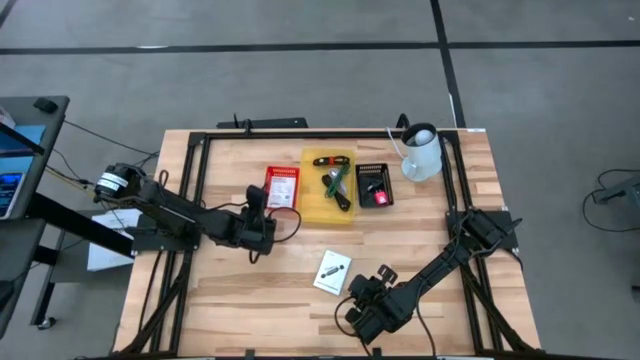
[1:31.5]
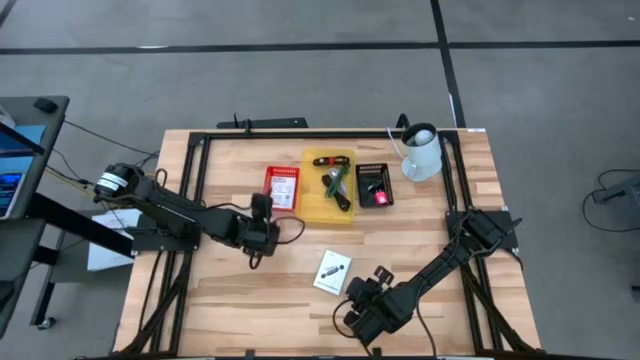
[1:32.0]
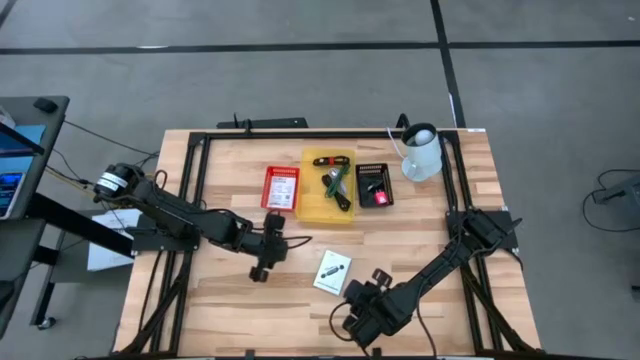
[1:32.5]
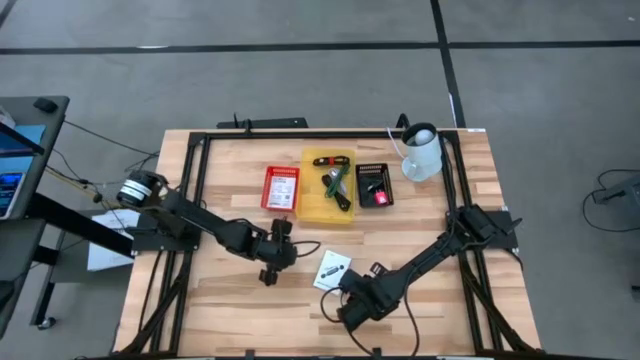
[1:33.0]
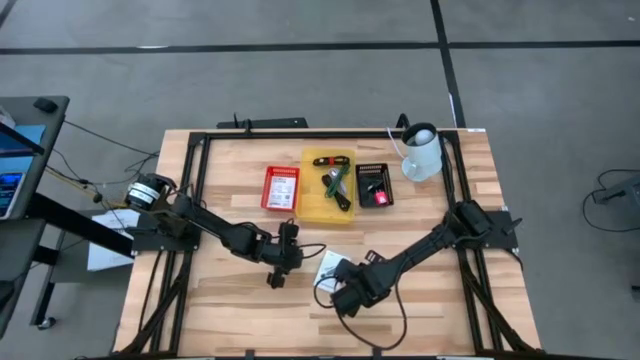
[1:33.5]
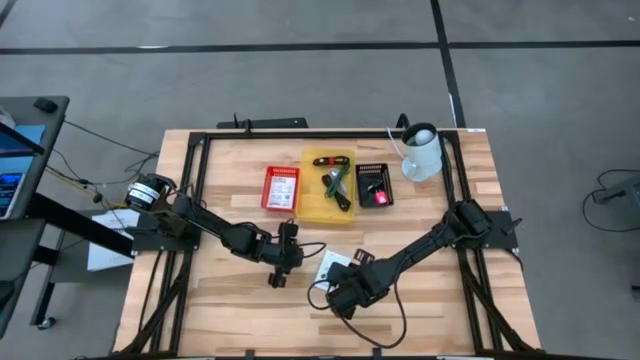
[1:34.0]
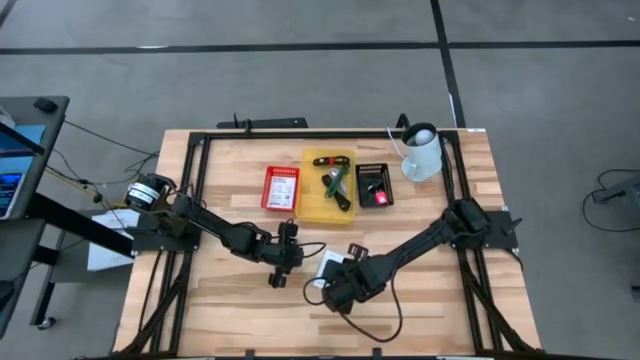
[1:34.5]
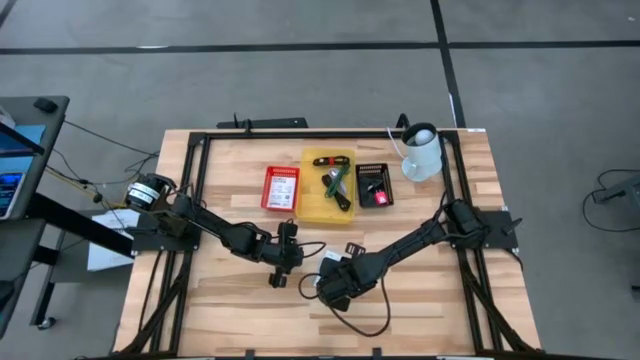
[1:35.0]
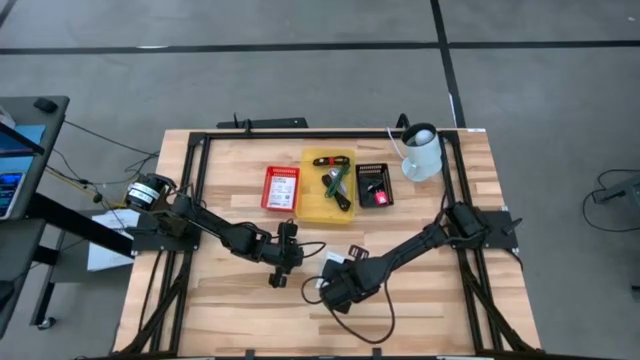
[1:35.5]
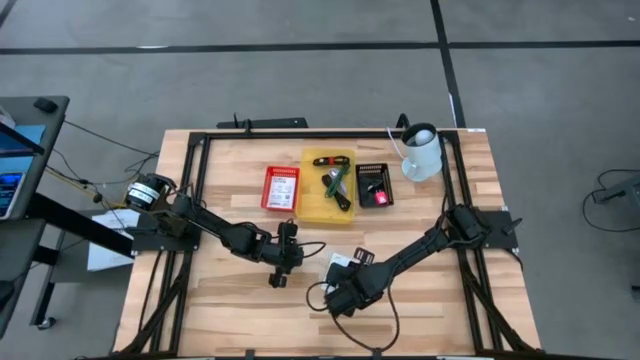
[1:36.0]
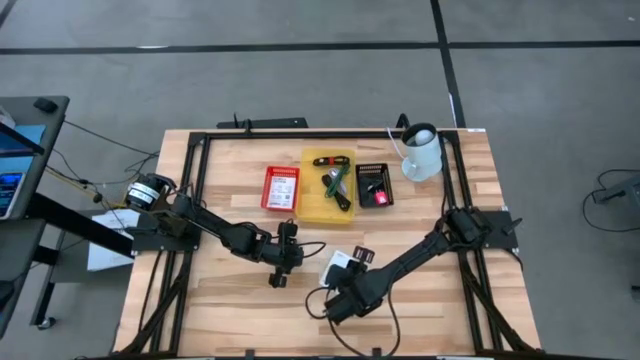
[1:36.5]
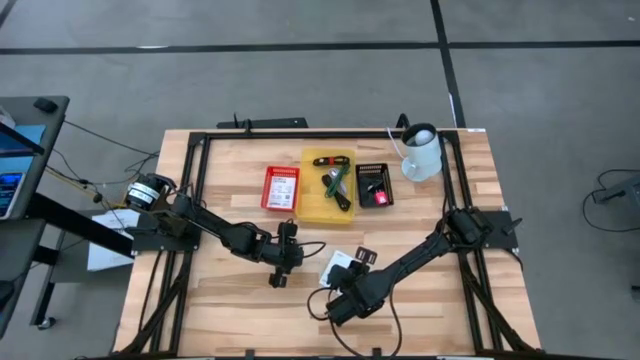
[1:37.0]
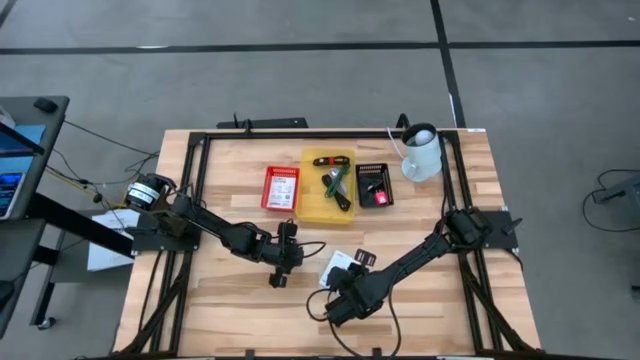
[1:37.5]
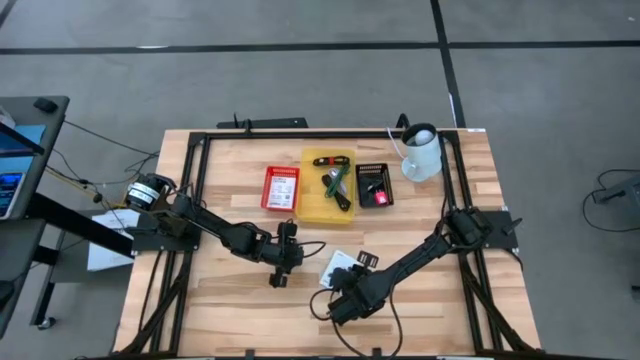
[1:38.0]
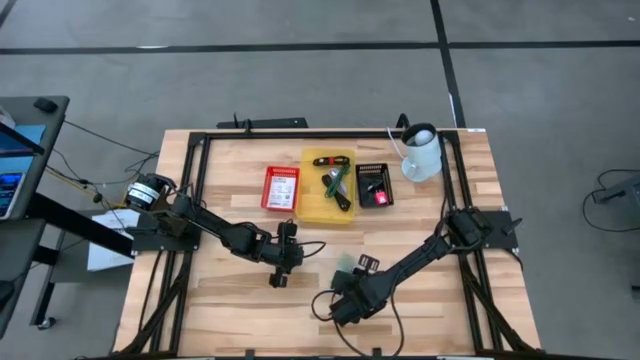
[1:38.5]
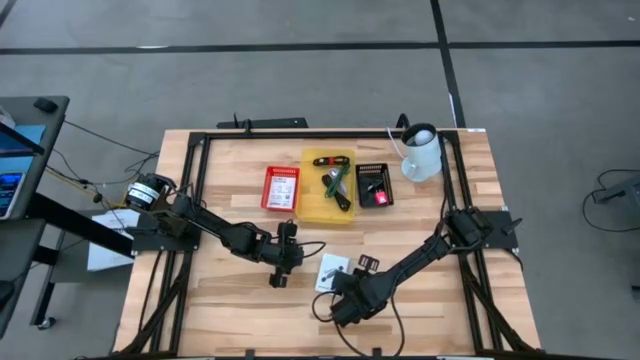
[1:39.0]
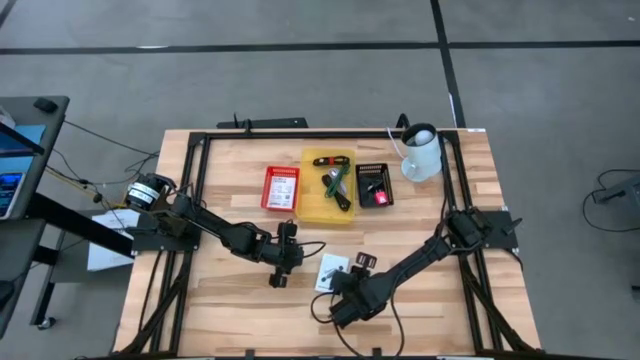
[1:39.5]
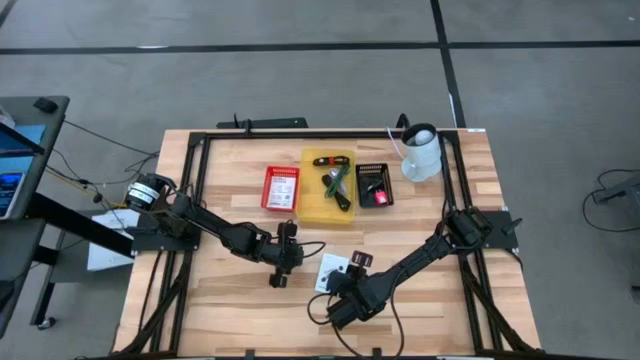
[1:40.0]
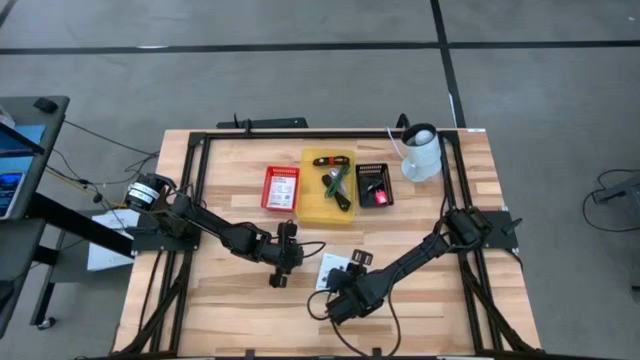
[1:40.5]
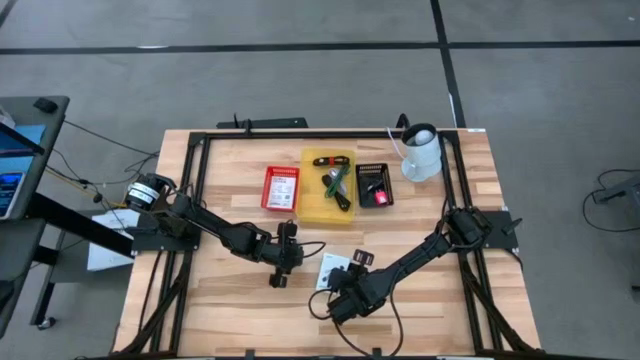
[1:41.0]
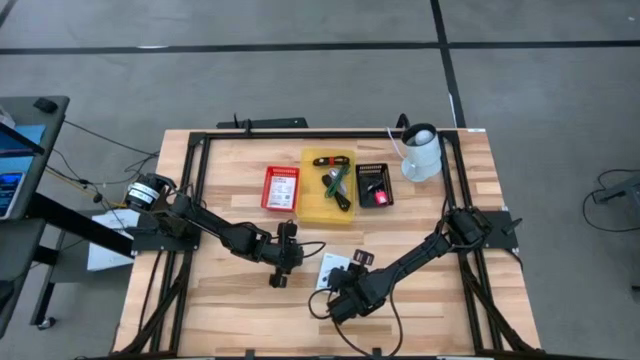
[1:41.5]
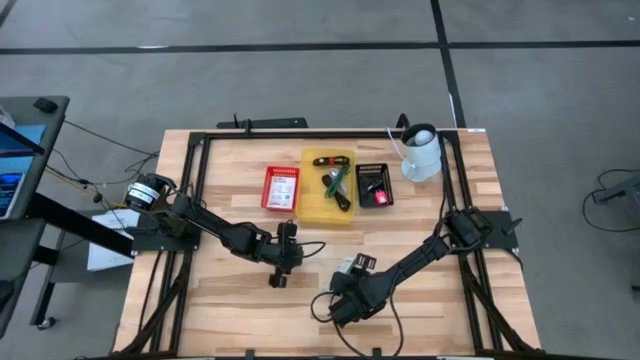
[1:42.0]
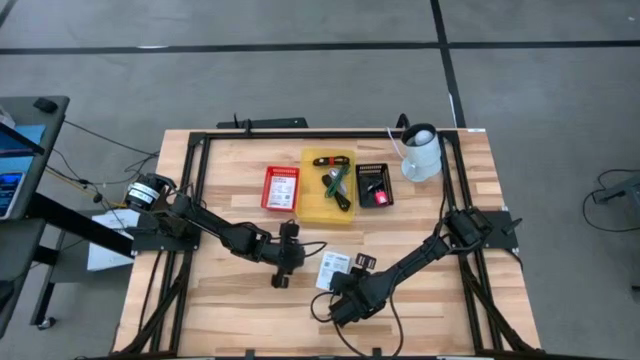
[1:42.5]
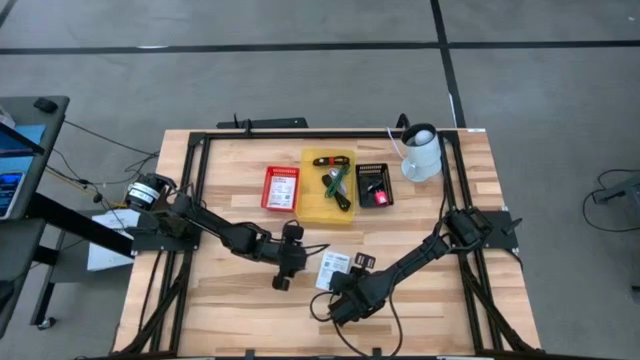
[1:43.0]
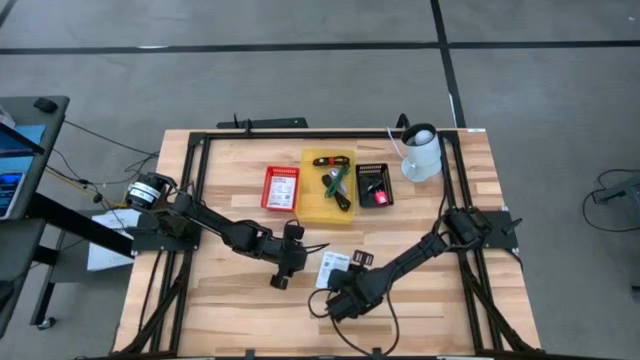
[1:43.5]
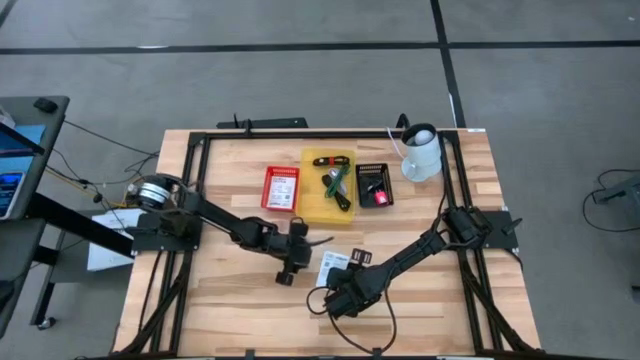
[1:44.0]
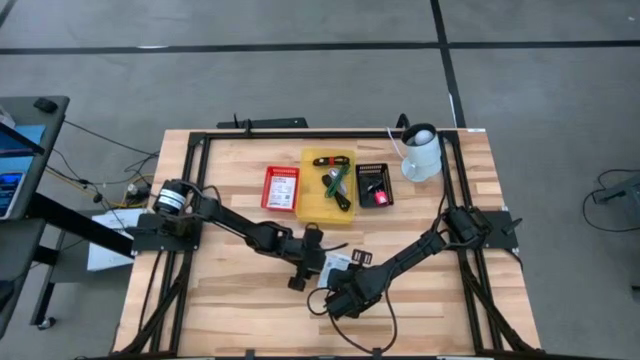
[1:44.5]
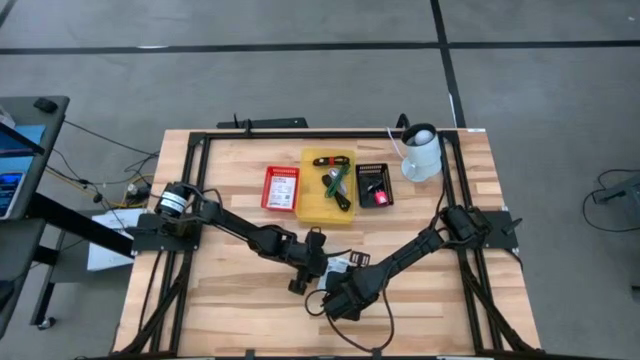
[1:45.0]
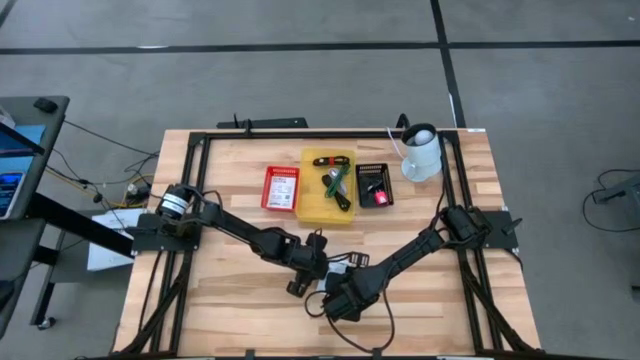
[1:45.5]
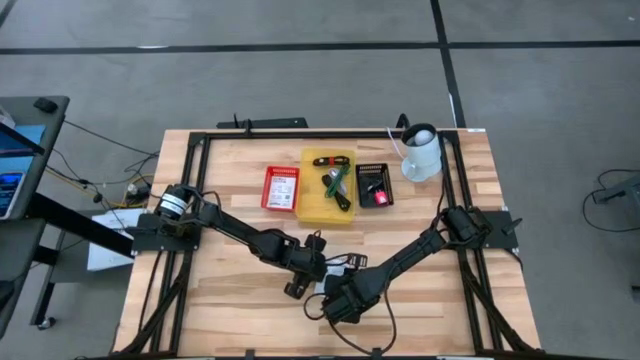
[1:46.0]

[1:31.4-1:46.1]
Task: Pick and place items into bin
Put the card reader box in the red bin

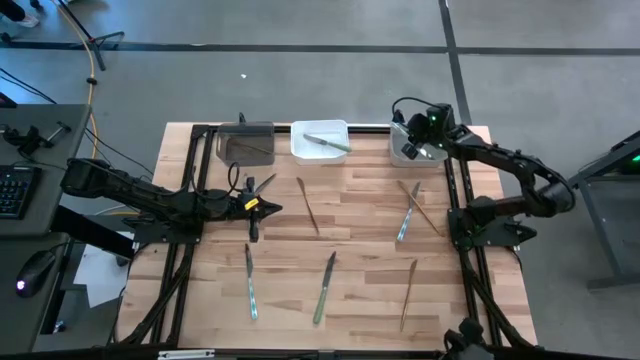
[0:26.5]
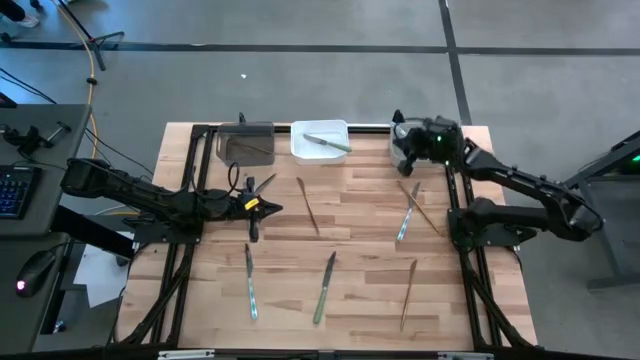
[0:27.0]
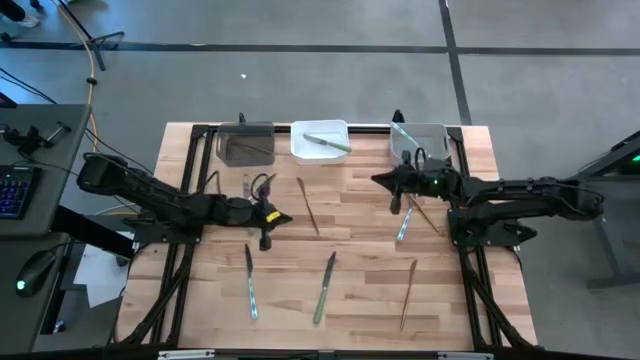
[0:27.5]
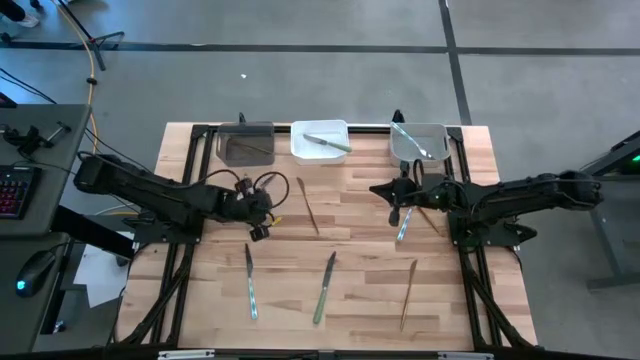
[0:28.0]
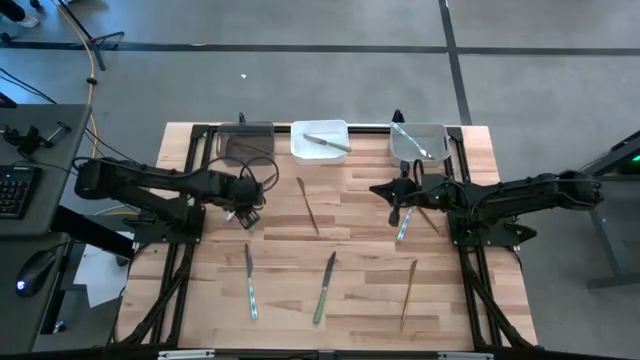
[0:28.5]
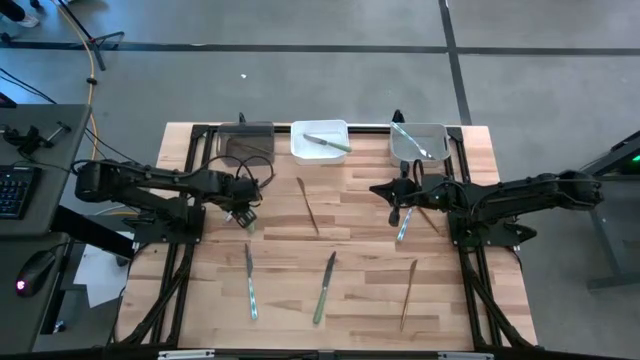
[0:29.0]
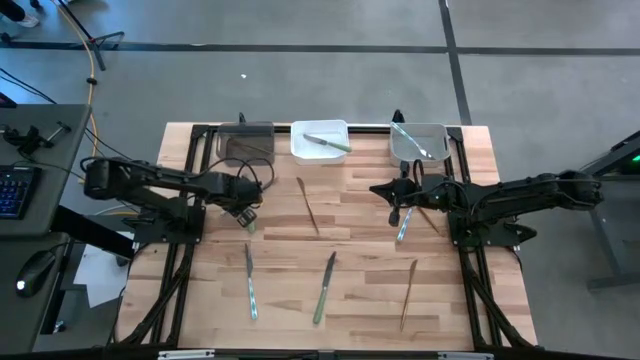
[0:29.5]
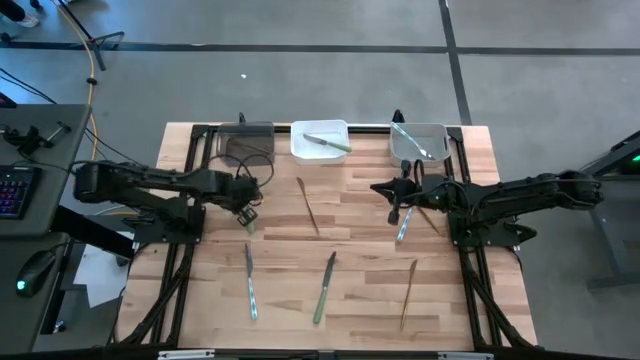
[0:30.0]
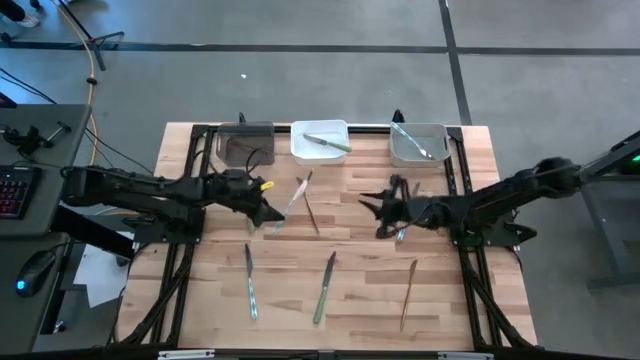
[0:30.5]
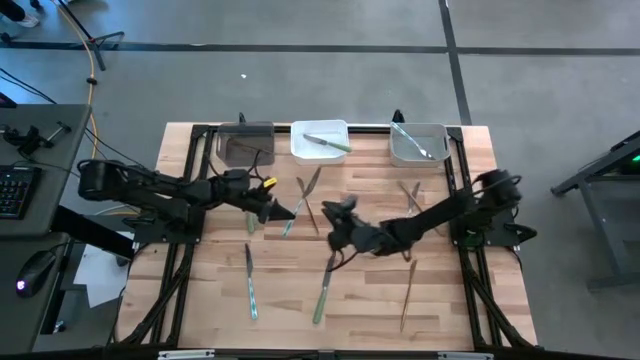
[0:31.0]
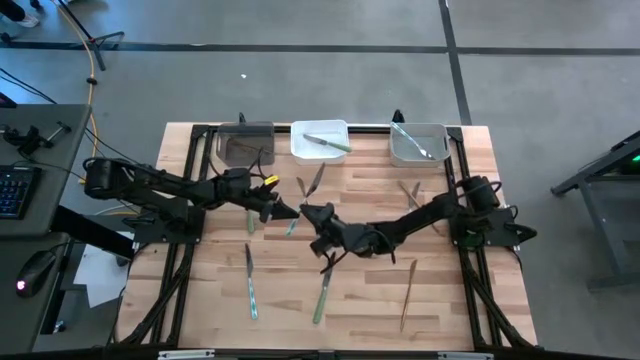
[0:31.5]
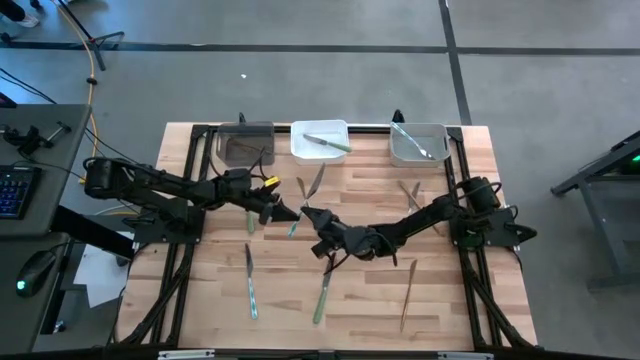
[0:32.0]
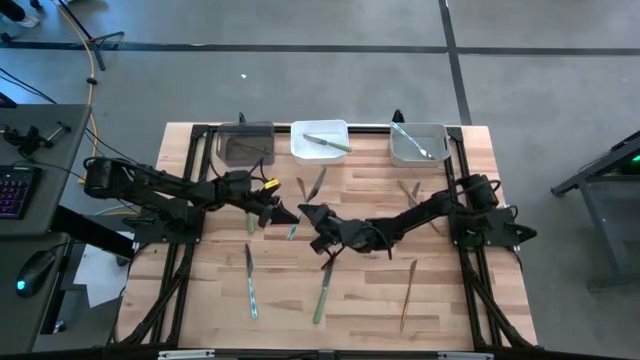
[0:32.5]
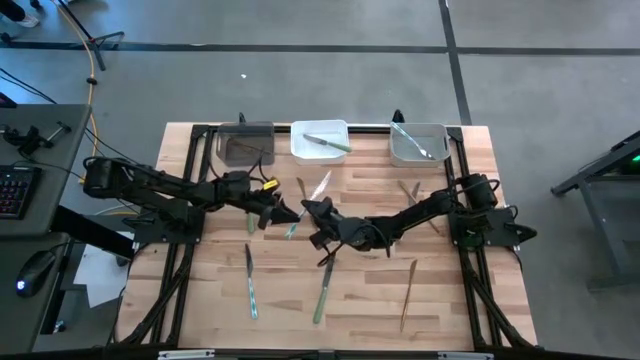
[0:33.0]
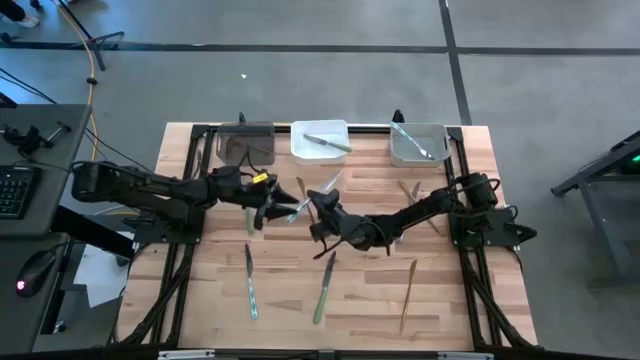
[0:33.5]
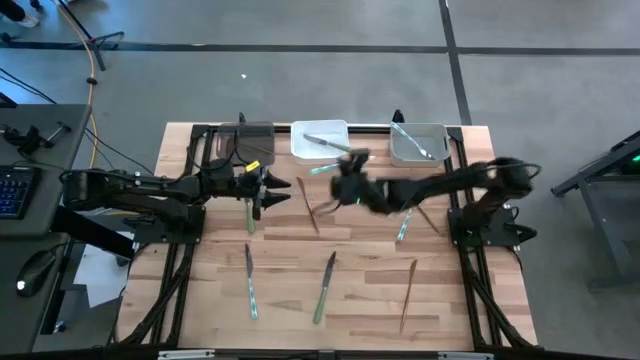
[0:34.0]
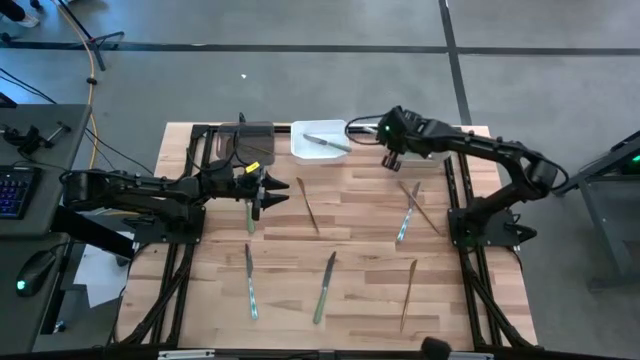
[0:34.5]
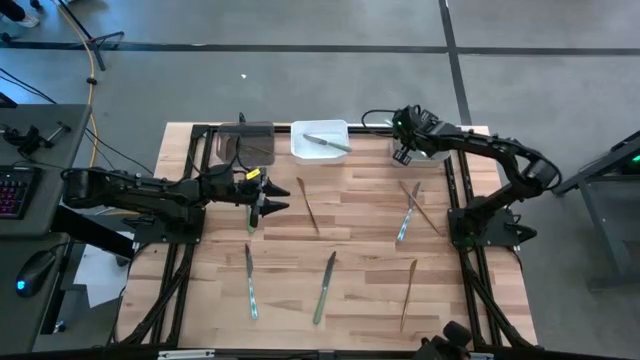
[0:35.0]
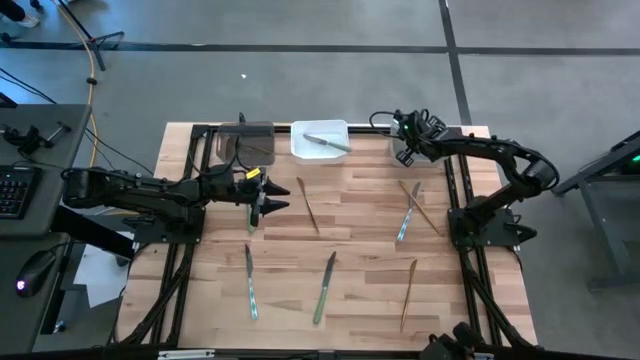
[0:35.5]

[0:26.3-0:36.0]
Task: Sort silverware by color (type)
Put the blue patterned knife into the gray bin
